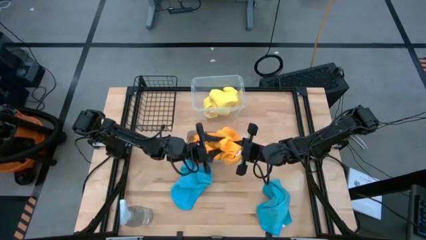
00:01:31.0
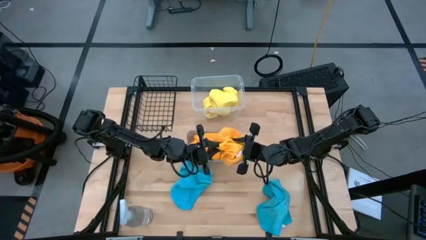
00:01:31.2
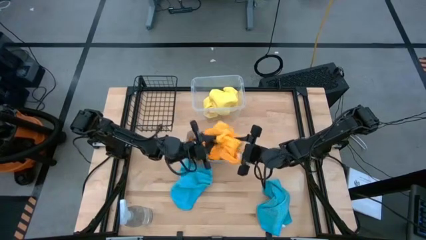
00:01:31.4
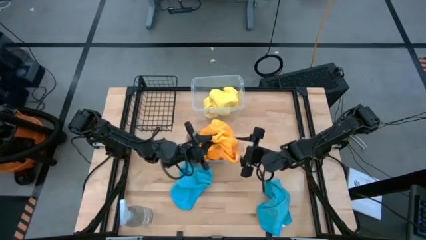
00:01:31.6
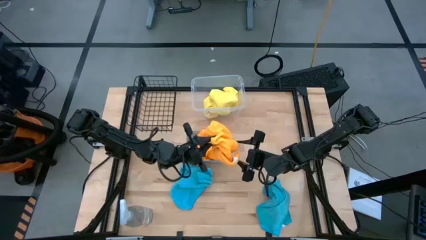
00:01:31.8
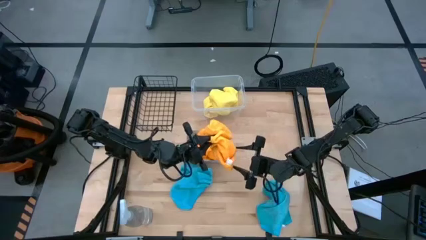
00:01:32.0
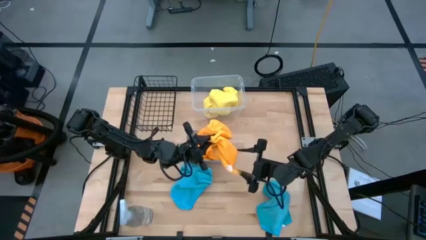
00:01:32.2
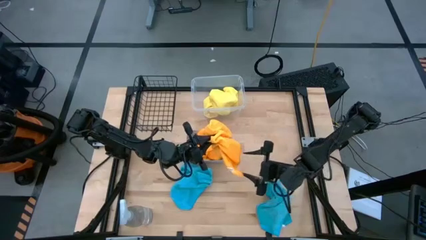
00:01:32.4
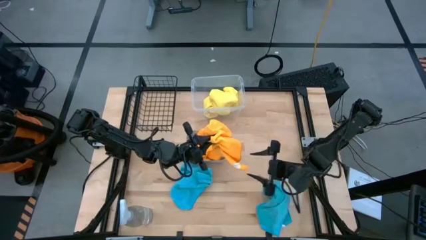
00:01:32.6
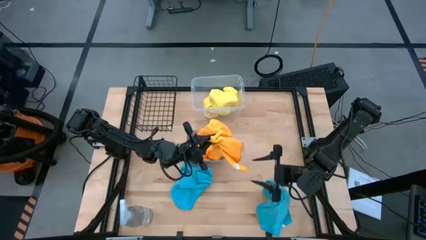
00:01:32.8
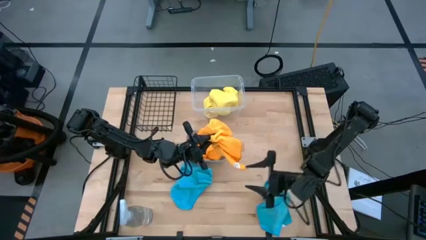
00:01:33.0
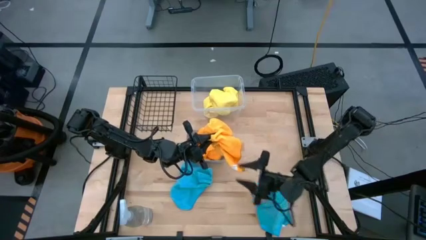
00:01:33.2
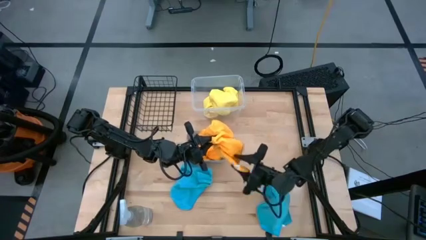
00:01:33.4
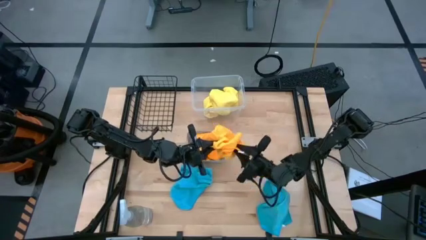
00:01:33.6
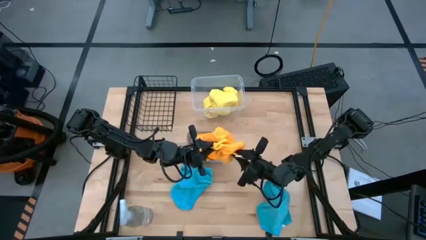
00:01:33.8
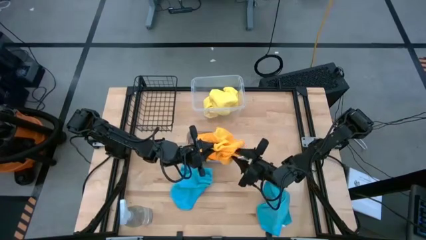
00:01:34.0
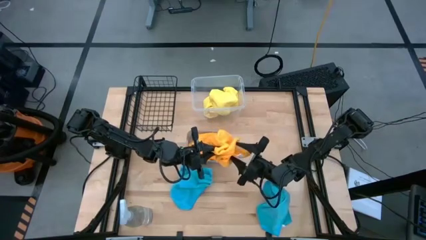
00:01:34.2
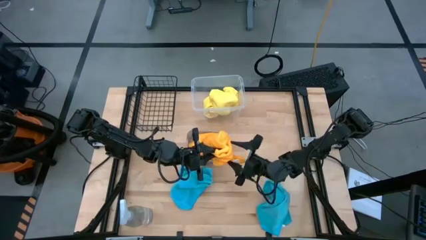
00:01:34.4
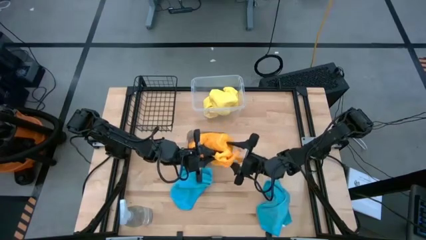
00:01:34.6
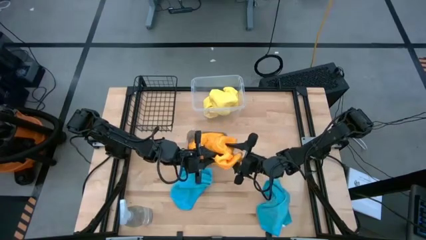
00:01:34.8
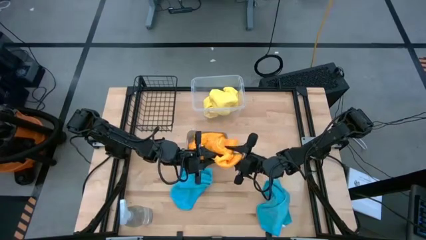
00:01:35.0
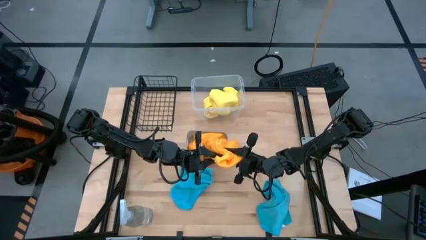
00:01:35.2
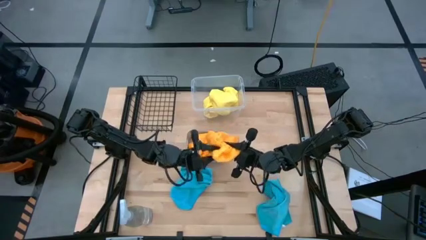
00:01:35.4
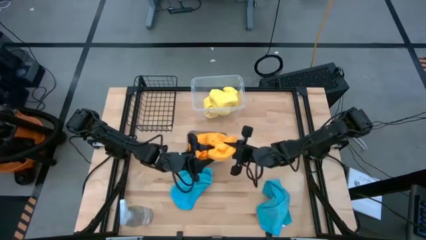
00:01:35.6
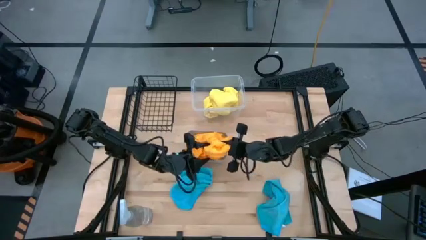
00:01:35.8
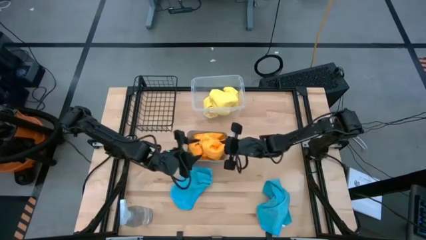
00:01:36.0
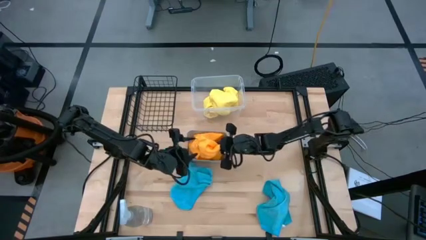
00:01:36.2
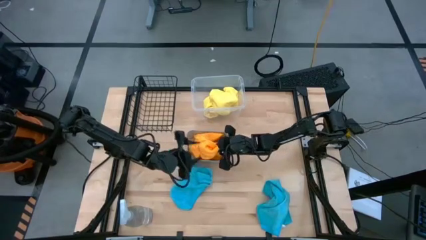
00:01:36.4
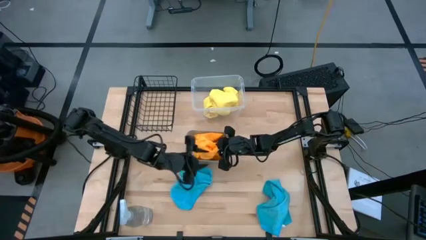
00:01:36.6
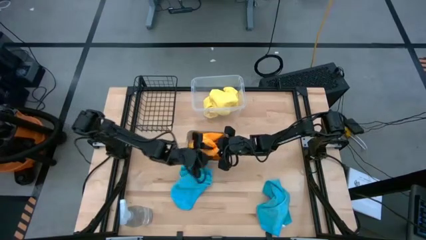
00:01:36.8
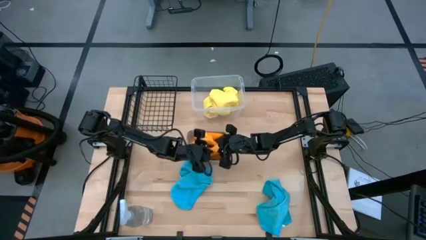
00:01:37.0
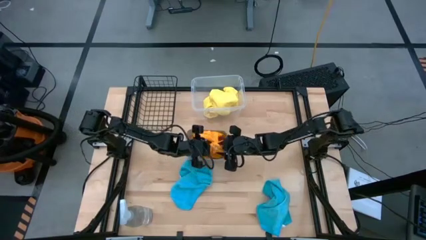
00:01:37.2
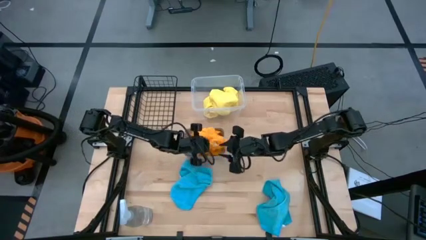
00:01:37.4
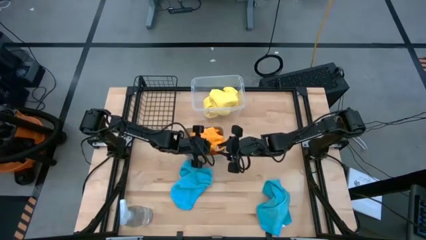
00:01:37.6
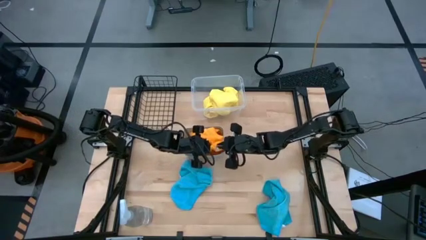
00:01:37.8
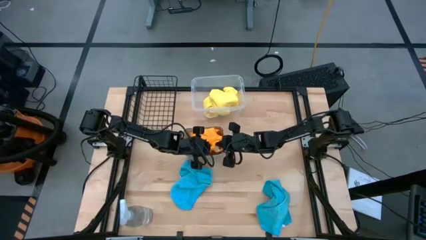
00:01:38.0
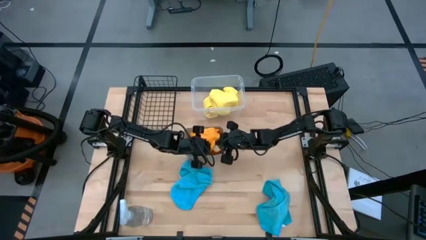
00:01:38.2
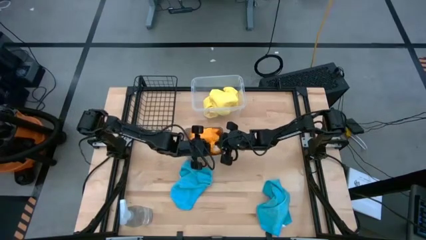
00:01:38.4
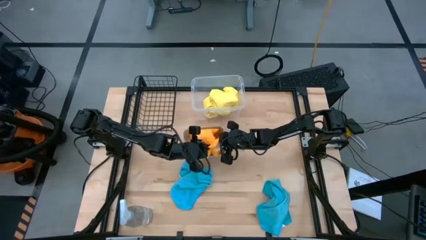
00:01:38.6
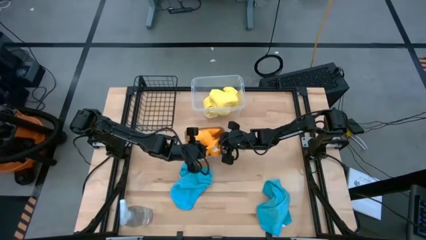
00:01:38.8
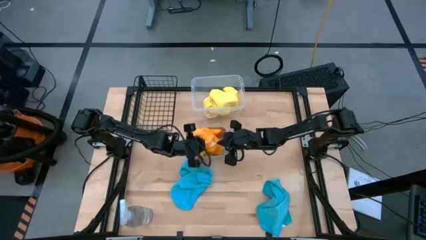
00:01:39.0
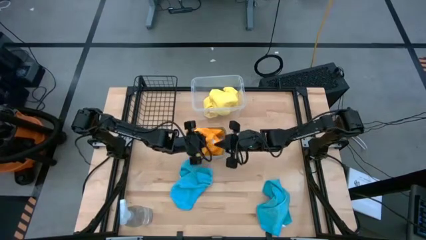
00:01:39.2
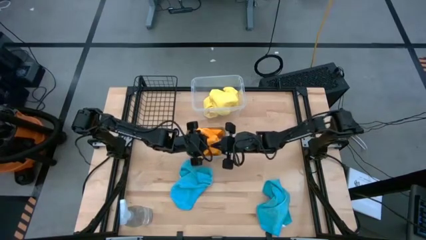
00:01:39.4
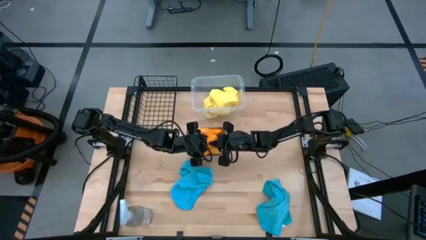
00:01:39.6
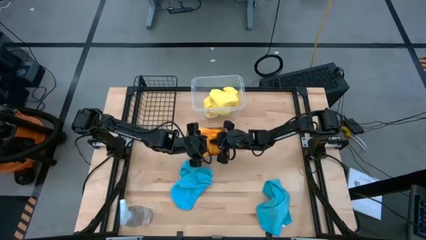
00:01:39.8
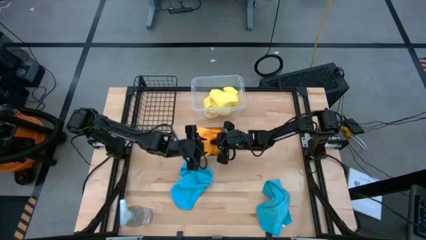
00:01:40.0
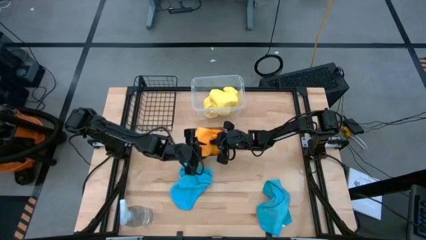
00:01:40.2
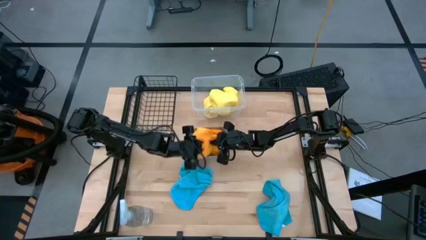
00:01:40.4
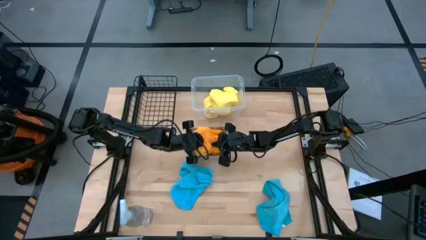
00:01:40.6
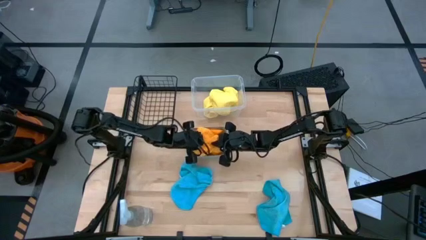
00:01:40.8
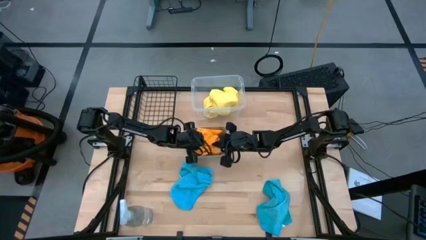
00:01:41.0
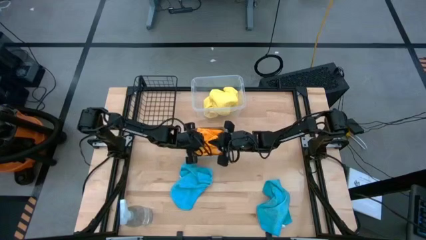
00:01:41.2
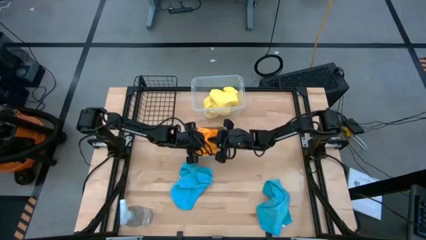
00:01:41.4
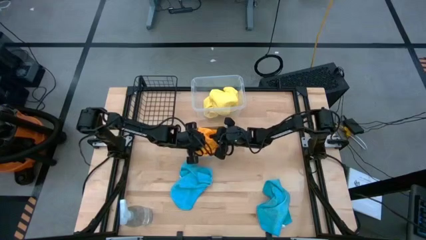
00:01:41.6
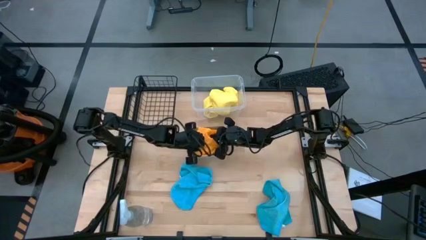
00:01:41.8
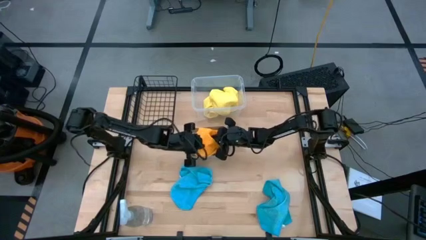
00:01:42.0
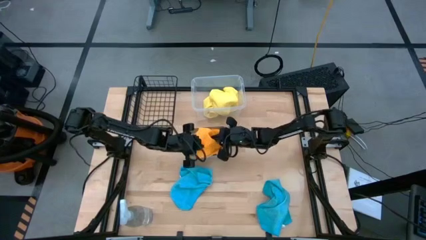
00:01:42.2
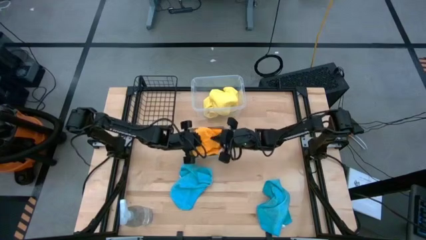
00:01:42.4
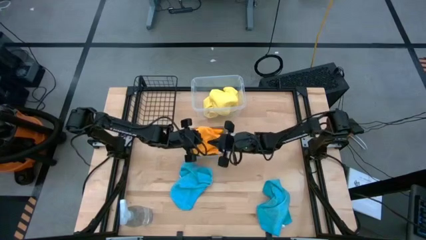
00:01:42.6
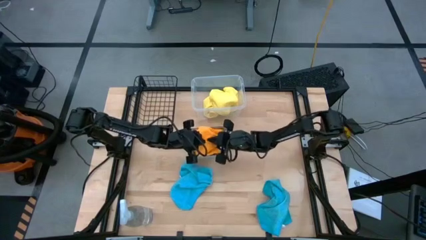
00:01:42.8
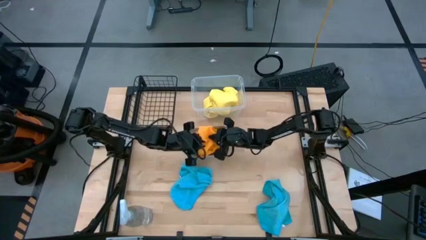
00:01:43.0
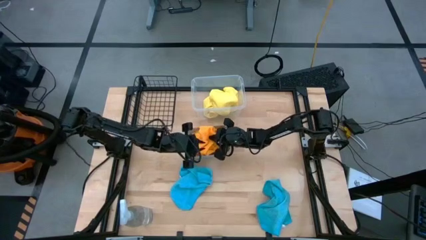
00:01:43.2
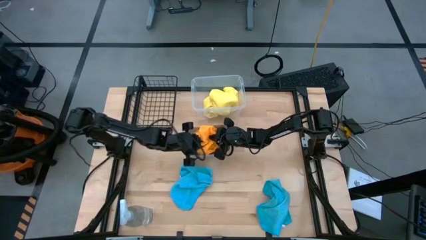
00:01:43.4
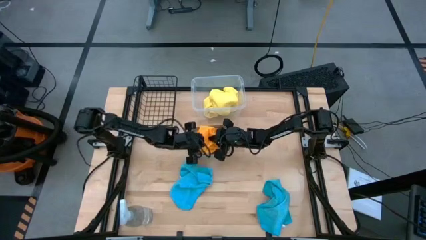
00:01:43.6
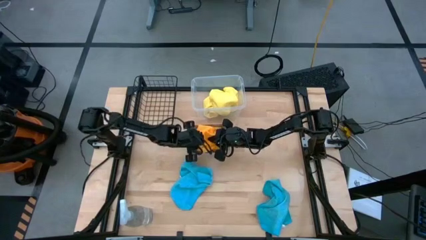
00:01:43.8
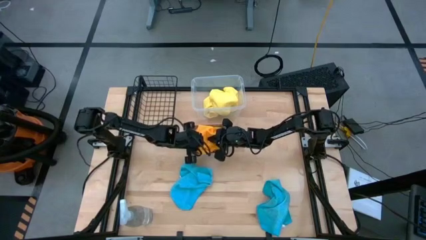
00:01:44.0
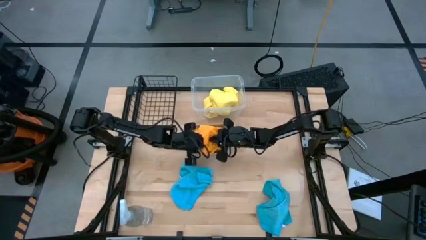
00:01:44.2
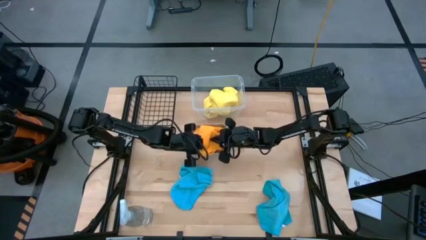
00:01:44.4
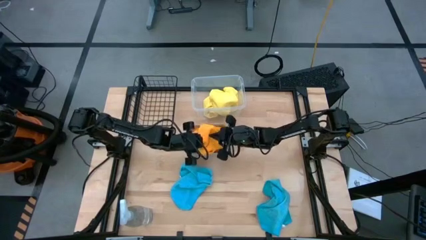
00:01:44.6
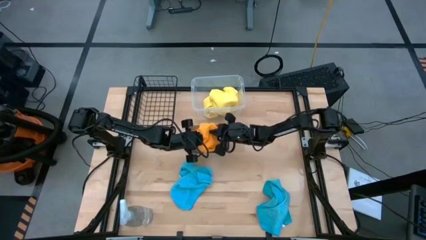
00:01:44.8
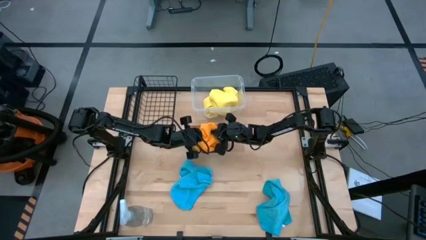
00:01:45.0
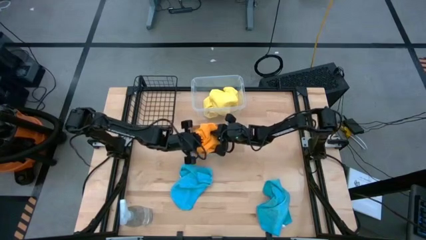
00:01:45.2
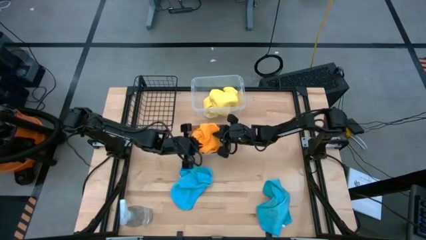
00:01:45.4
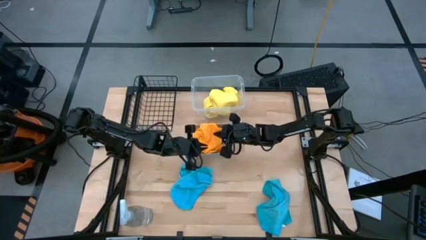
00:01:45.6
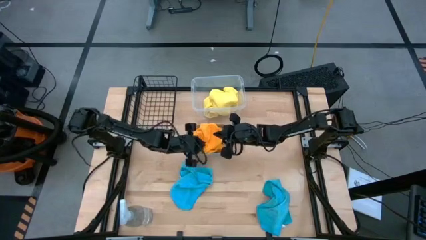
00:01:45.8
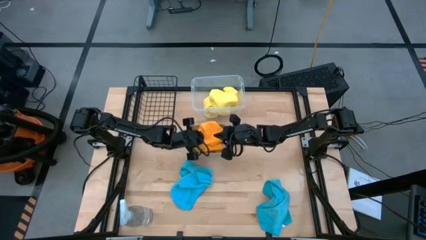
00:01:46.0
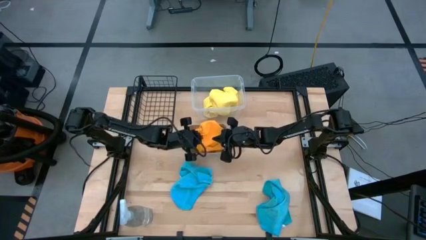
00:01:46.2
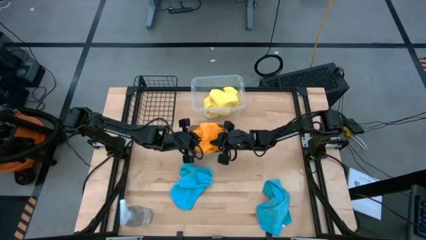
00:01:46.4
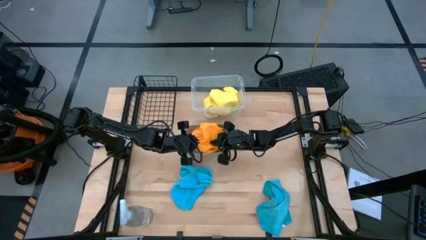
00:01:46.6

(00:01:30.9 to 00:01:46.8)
Task: Sort microfiber towel by color & place in baskets
Put the orange microfiber cloth into the gray bin

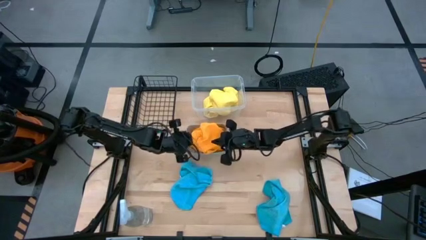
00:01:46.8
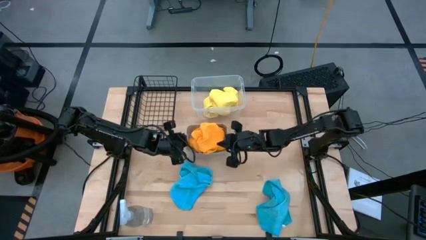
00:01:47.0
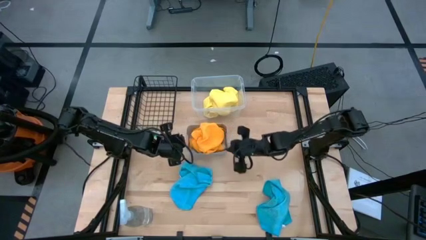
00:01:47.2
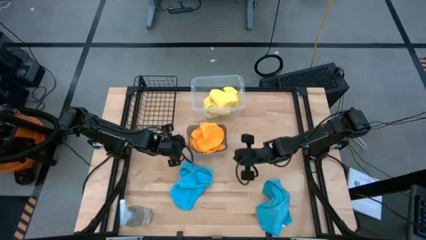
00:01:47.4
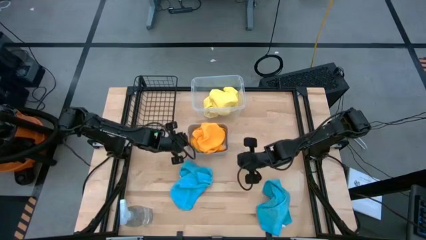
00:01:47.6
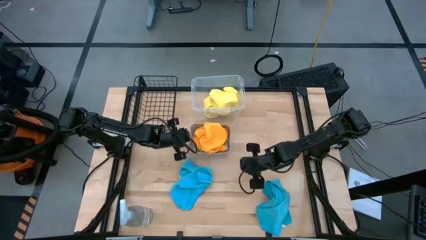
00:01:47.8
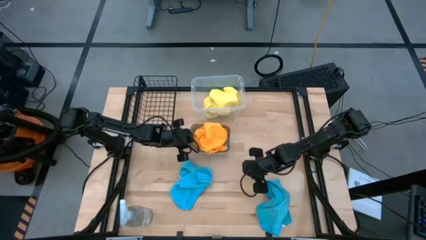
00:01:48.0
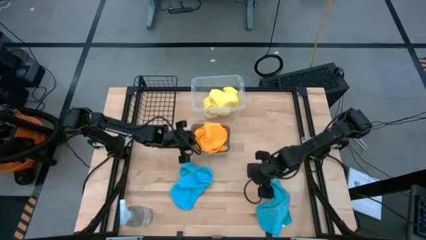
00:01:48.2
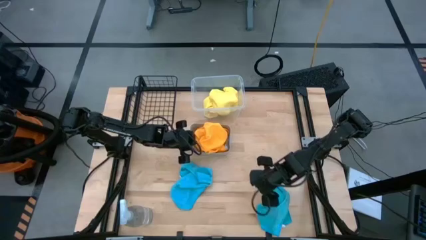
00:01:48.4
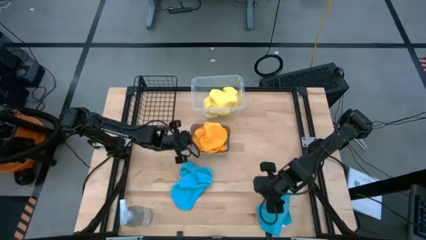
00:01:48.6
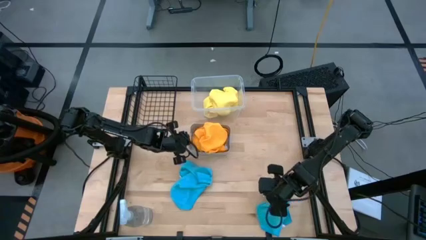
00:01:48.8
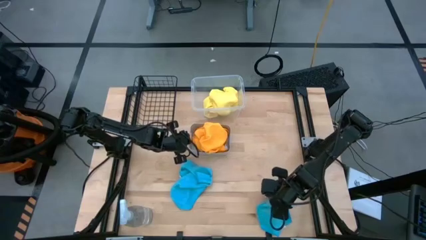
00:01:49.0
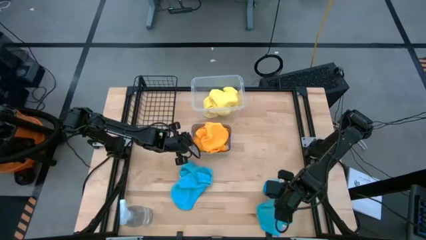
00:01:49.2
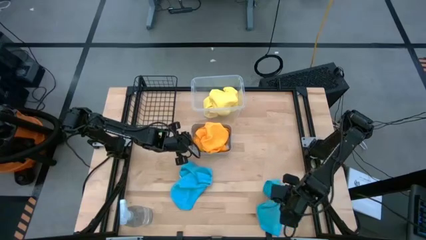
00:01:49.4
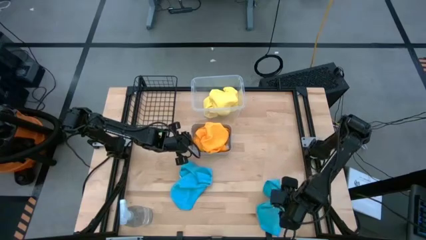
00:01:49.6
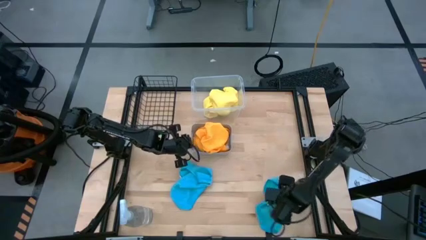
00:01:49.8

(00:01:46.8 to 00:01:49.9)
Adjust the gray bin
